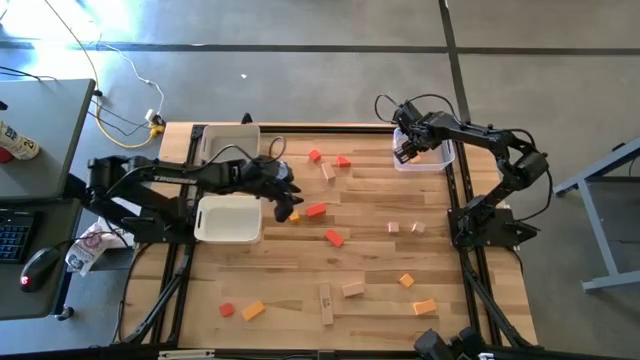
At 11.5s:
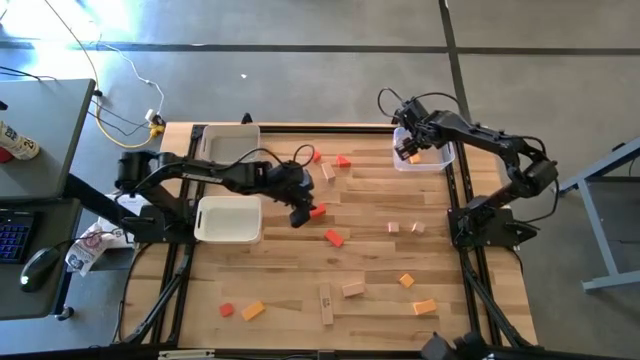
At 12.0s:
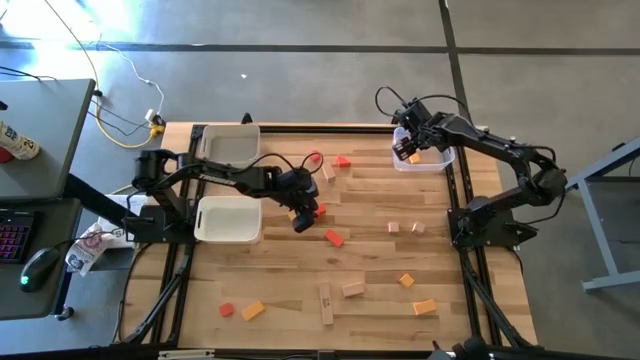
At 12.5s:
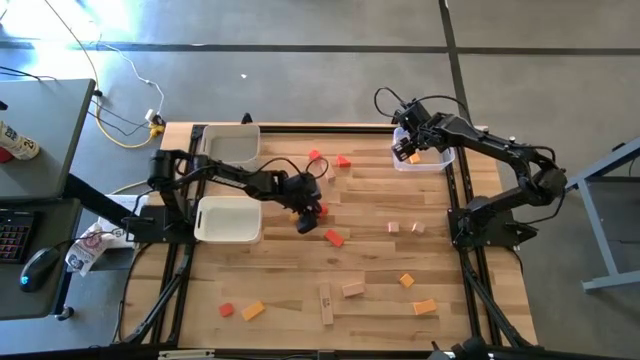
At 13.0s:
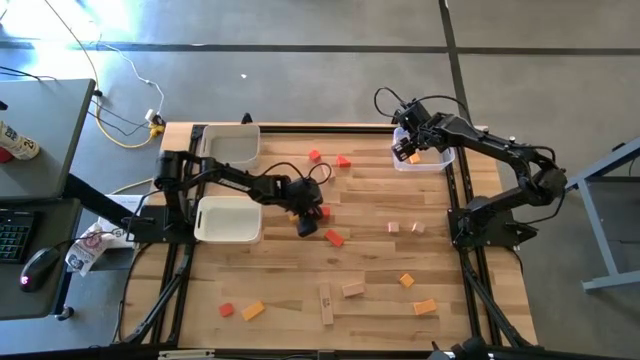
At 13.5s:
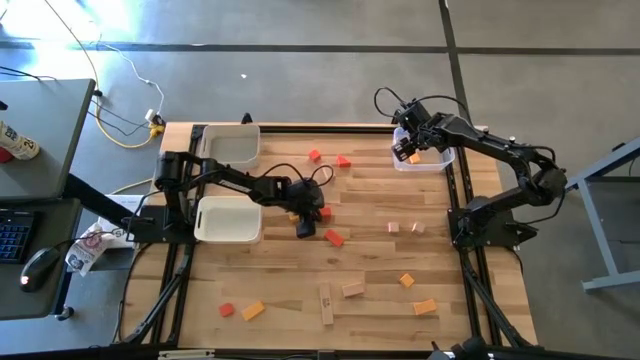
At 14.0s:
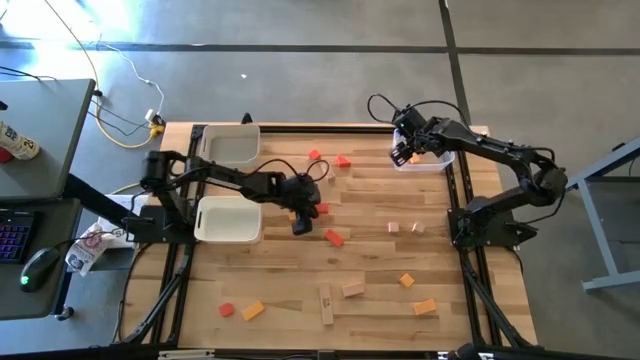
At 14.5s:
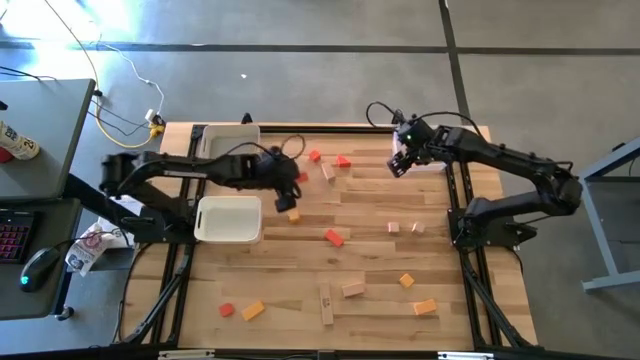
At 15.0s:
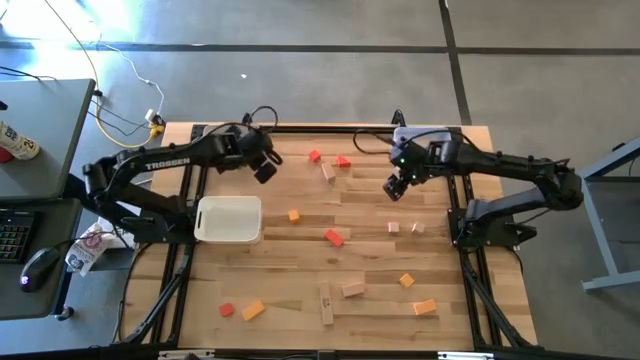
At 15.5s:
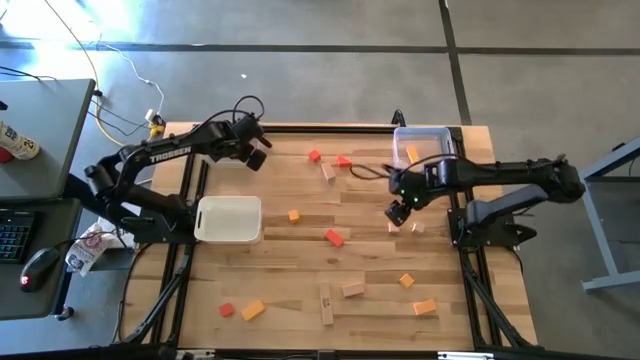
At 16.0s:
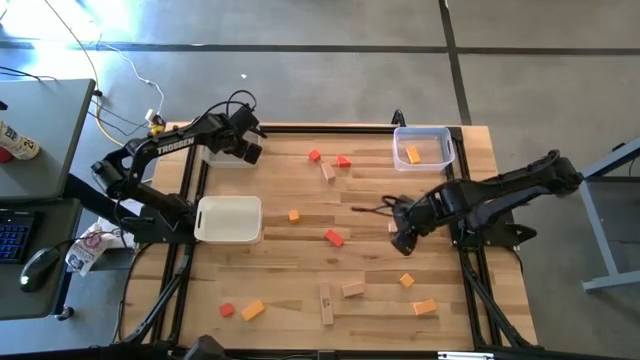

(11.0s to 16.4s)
Task: Sort & place blocks by color
Put the orange block into the gray bin

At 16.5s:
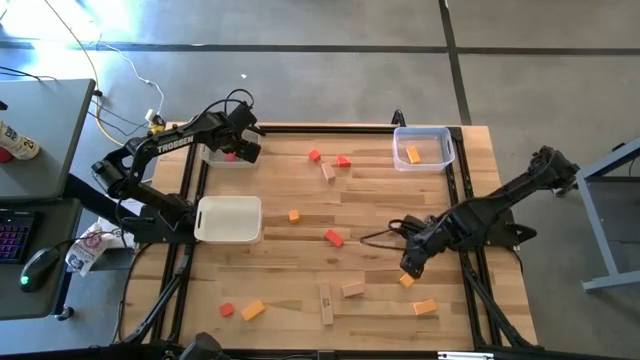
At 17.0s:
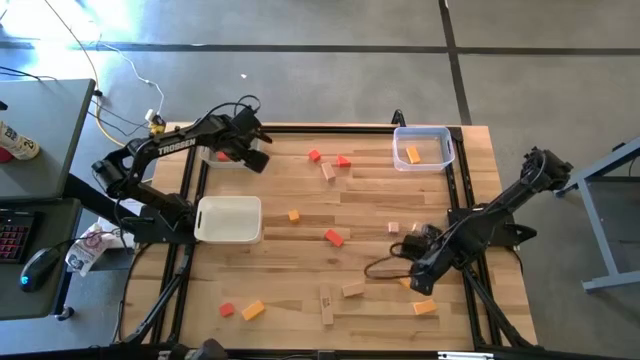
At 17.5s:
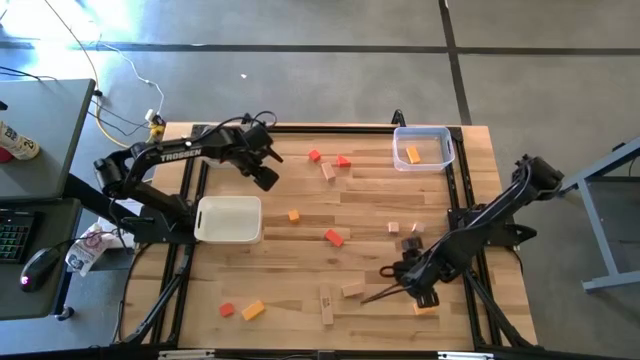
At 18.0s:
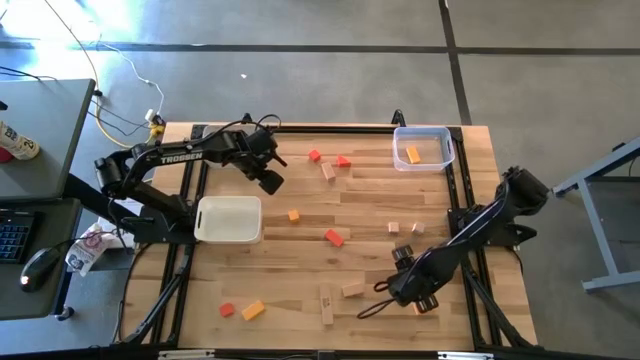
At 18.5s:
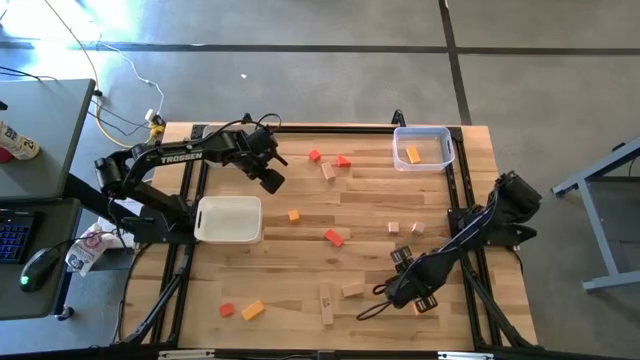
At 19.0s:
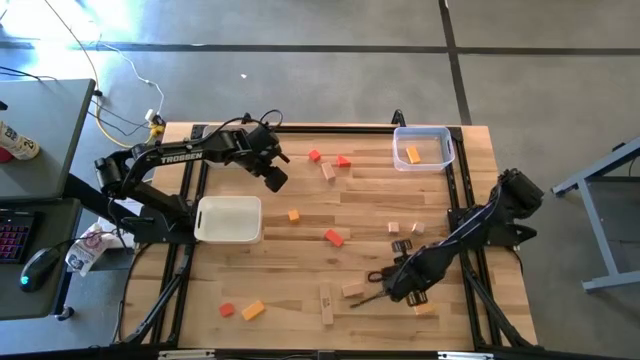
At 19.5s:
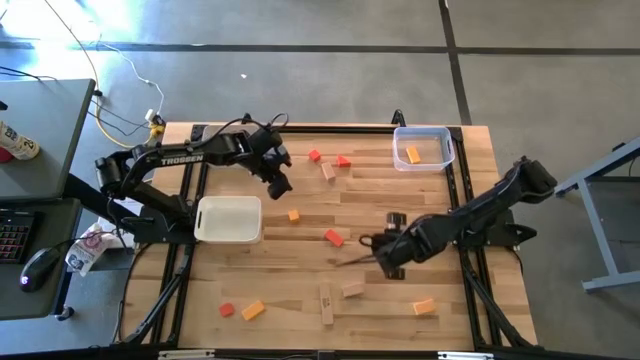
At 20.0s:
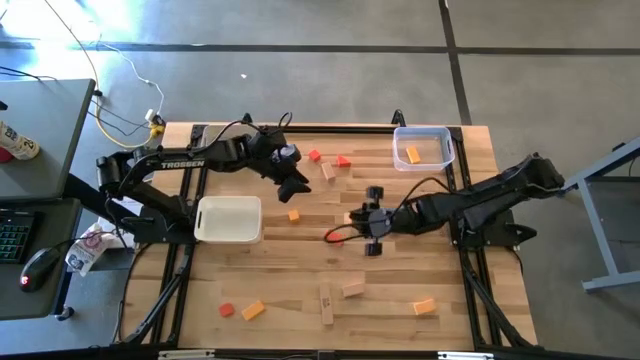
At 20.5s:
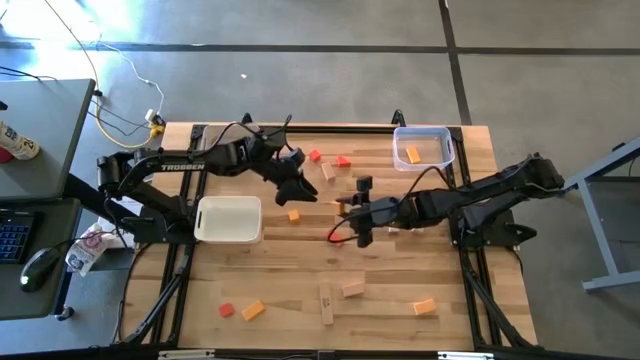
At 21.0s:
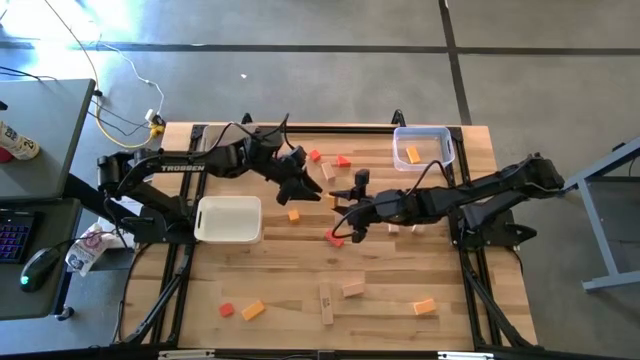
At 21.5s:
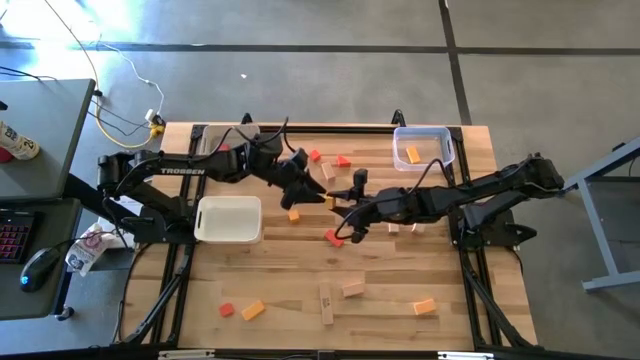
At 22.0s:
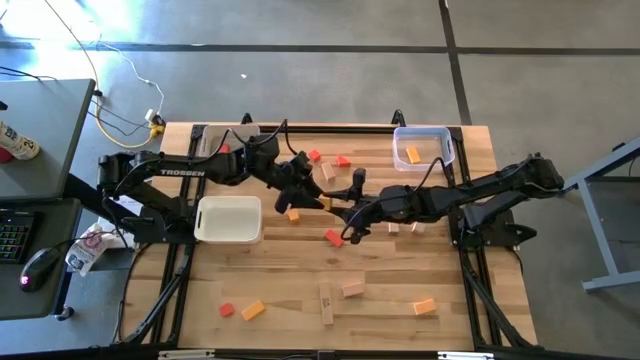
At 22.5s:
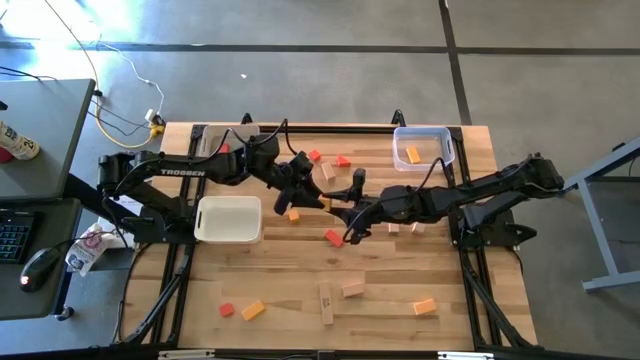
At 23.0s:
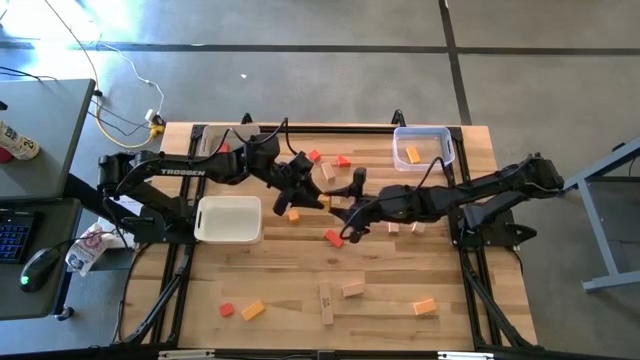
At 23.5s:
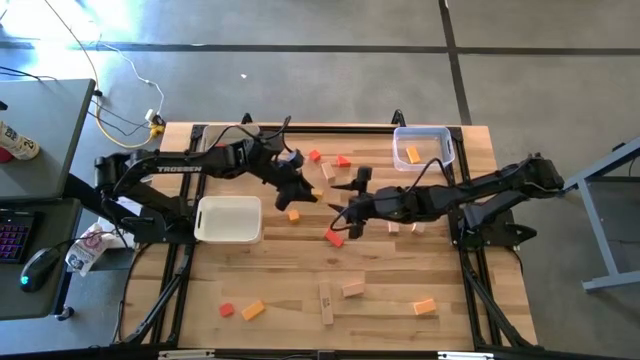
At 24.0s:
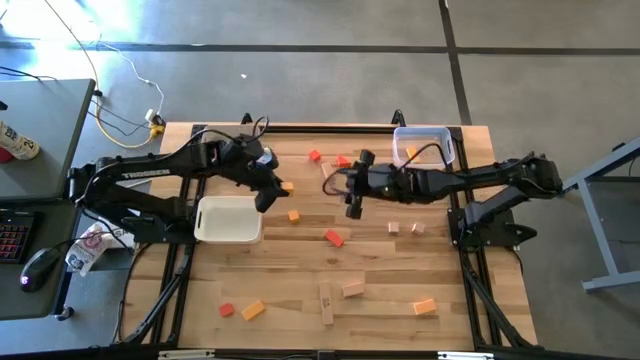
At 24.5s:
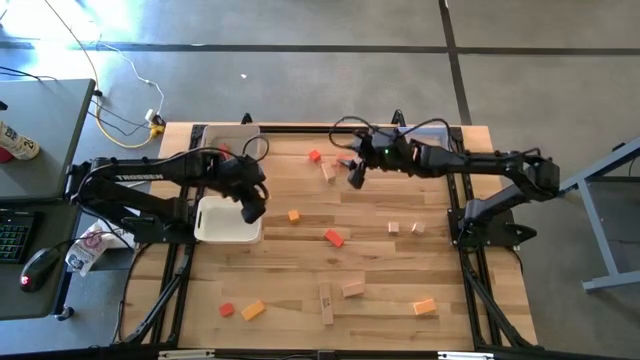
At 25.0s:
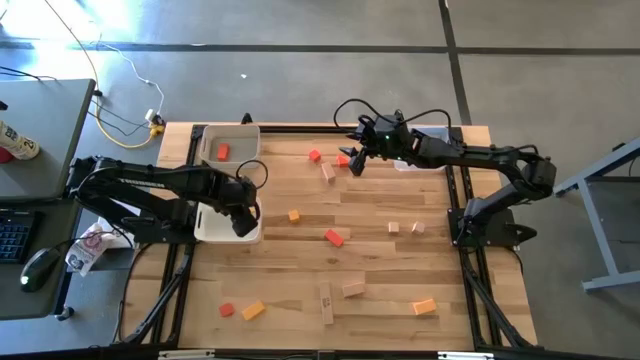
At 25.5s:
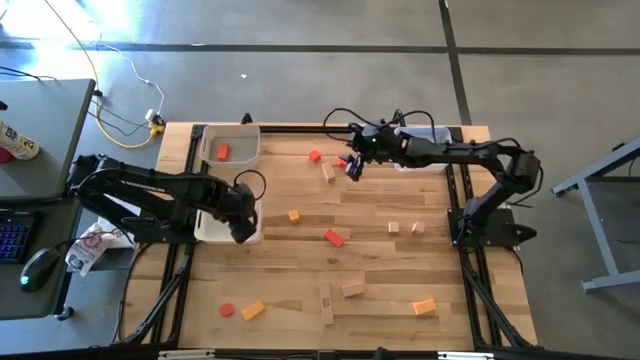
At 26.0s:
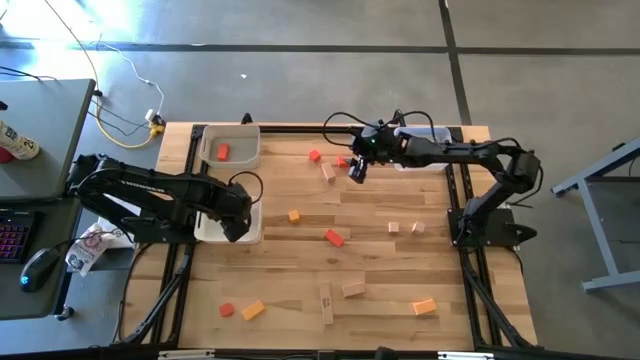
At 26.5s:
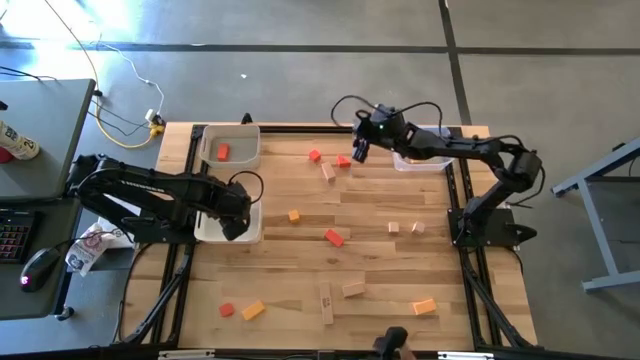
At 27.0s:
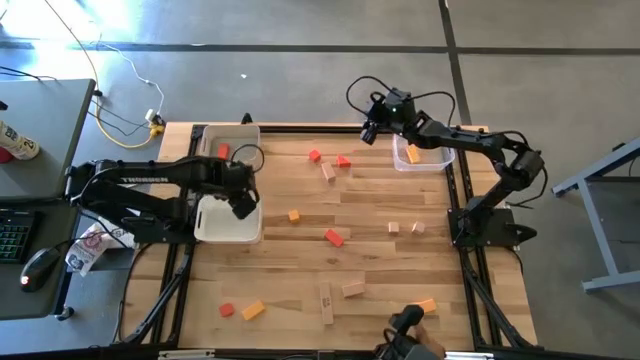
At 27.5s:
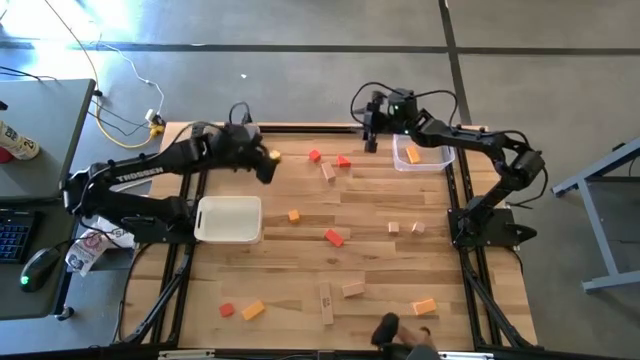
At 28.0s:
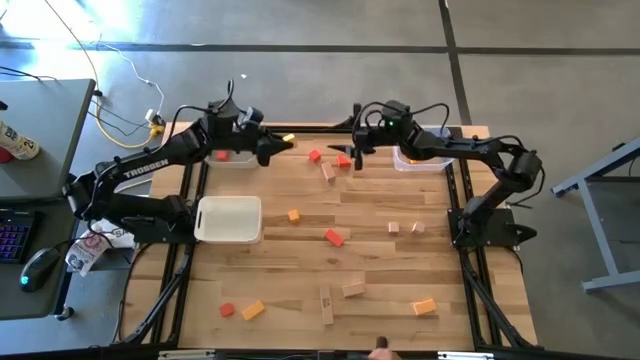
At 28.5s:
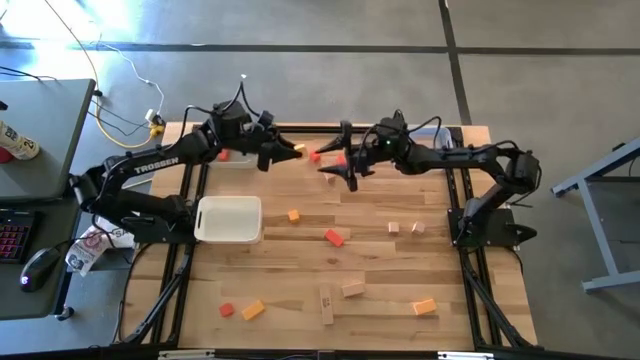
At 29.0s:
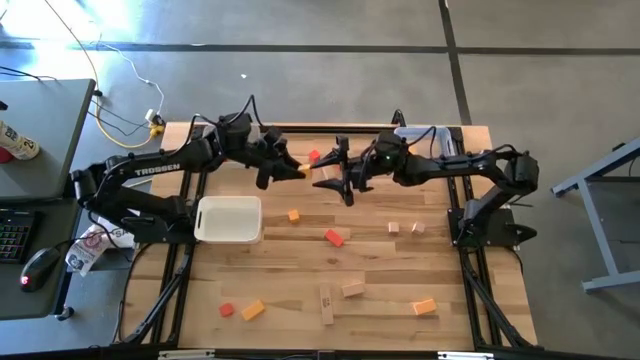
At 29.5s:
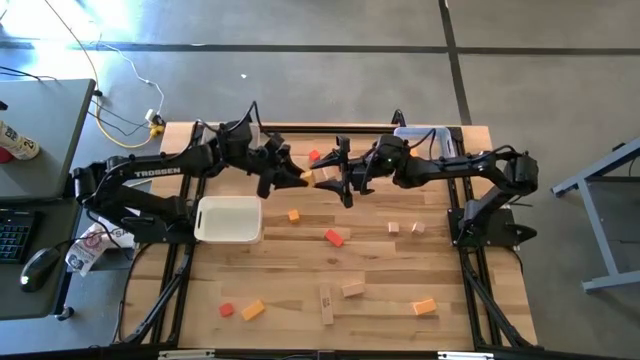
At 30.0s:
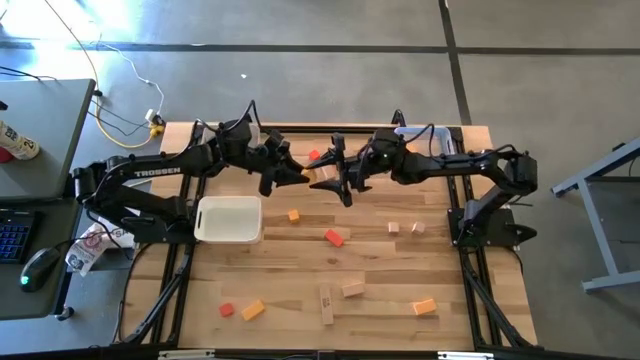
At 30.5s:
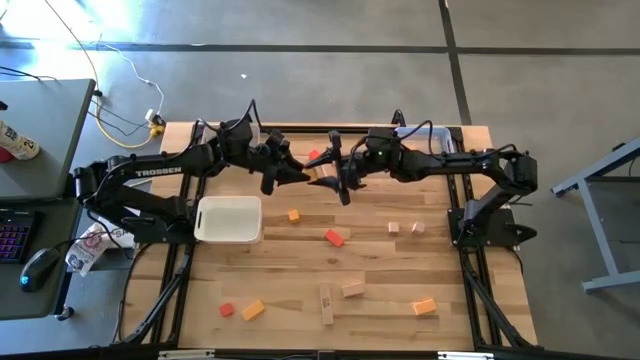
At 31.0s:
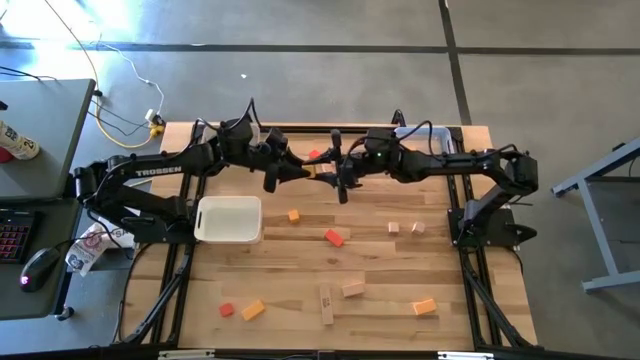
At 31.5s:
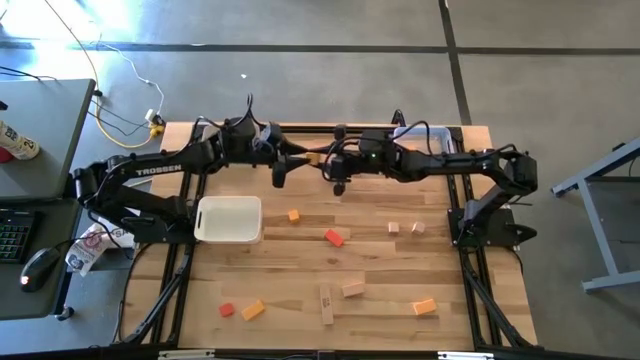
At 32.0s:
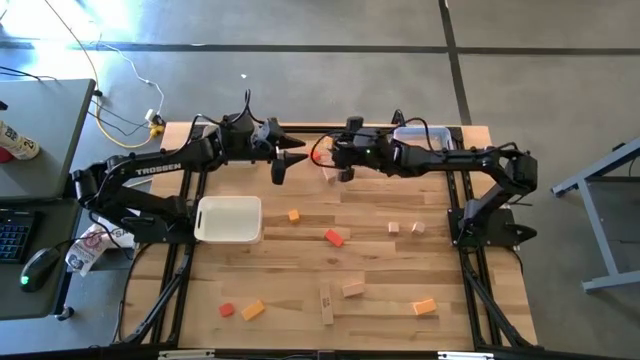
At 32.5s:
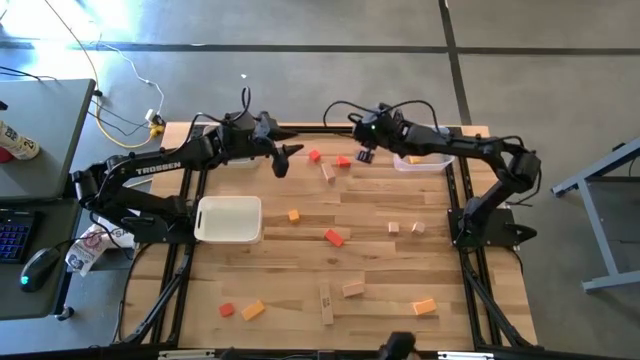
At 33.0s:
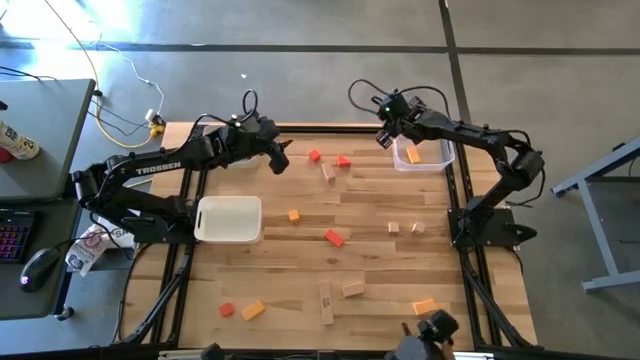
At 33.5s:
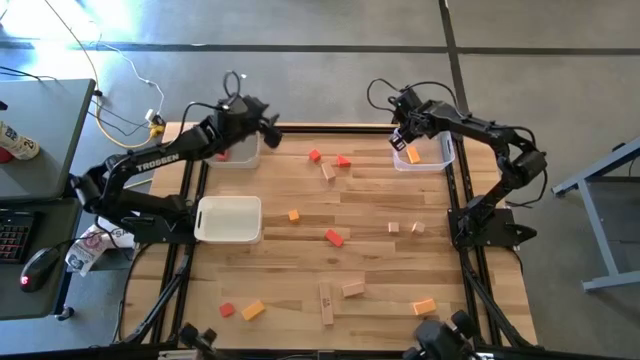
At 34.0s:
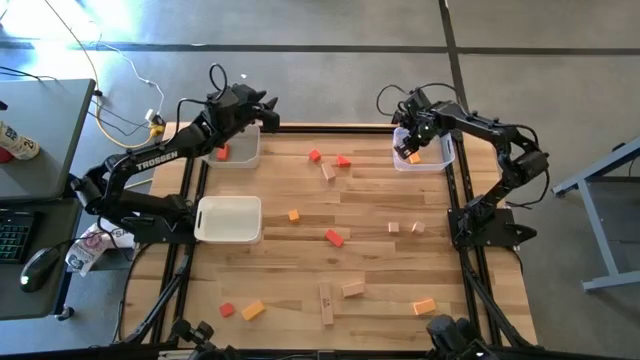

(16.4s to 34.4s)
Put the yellow block into the transparent bin
